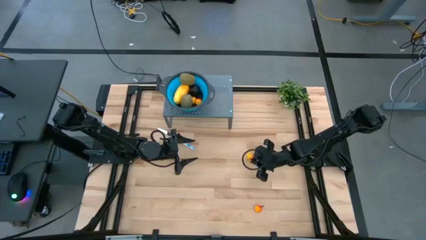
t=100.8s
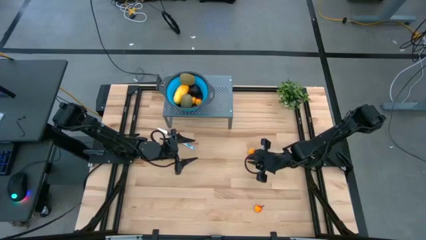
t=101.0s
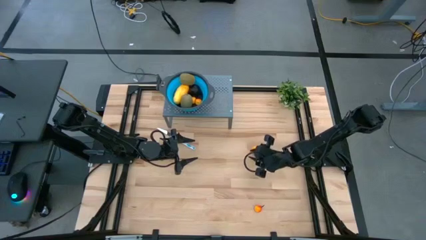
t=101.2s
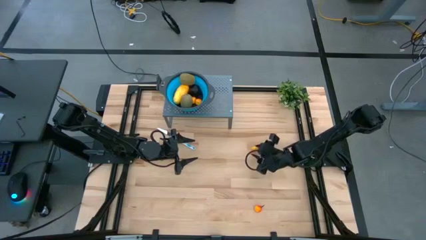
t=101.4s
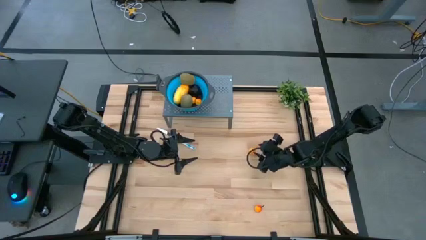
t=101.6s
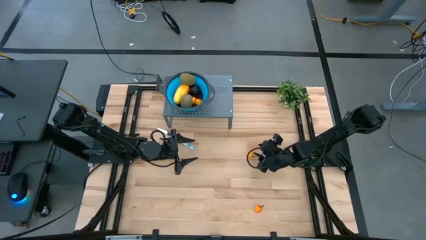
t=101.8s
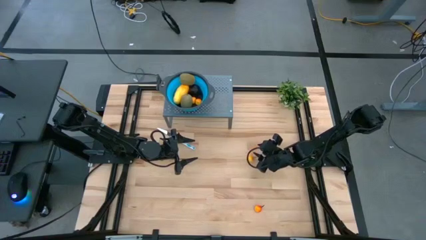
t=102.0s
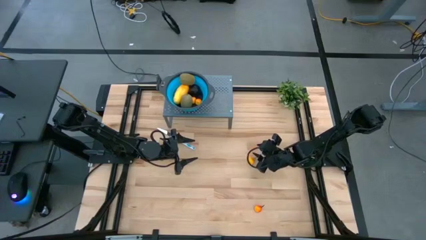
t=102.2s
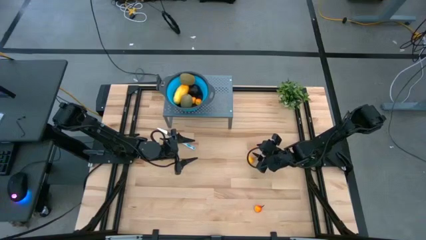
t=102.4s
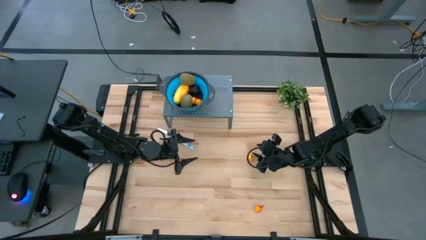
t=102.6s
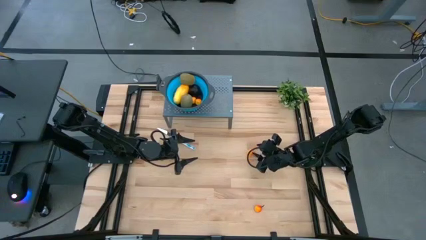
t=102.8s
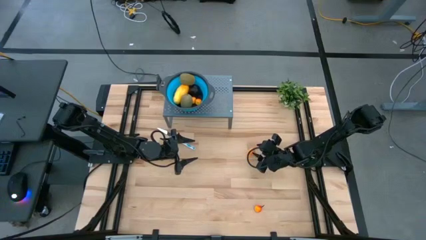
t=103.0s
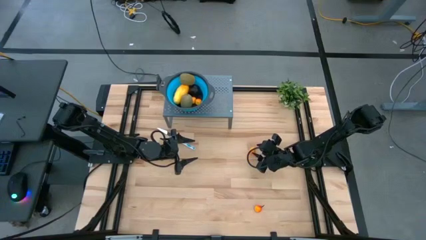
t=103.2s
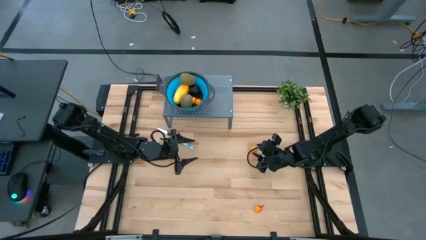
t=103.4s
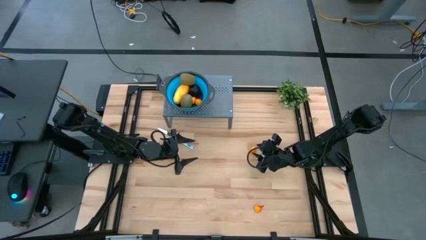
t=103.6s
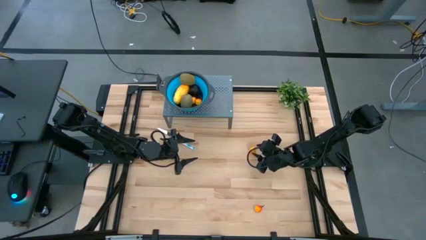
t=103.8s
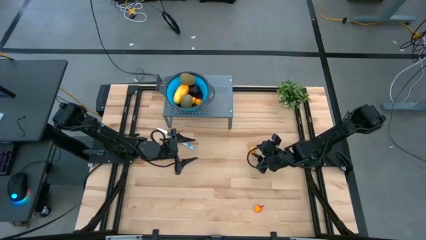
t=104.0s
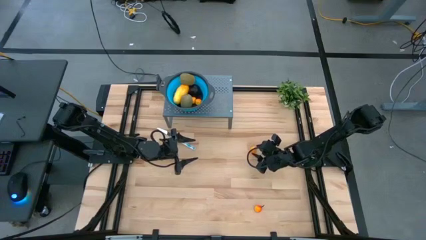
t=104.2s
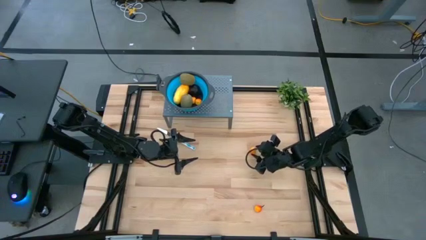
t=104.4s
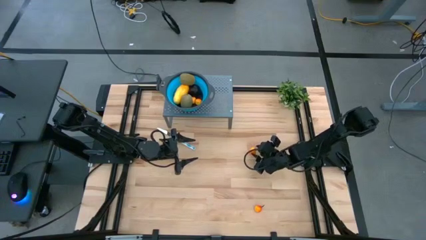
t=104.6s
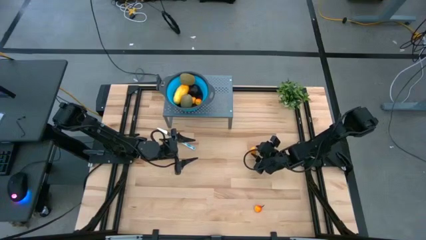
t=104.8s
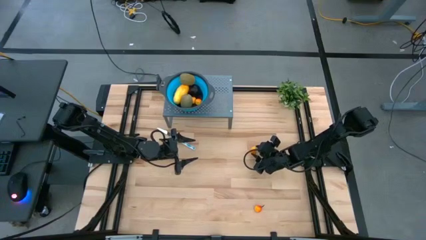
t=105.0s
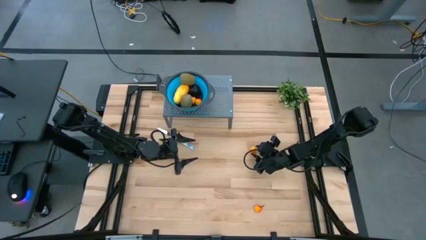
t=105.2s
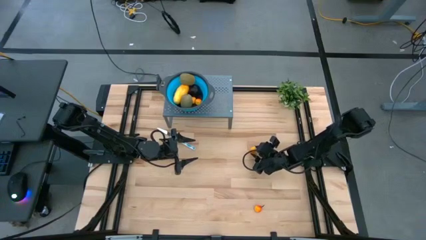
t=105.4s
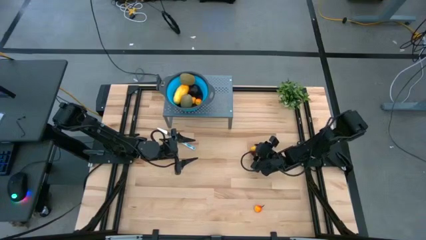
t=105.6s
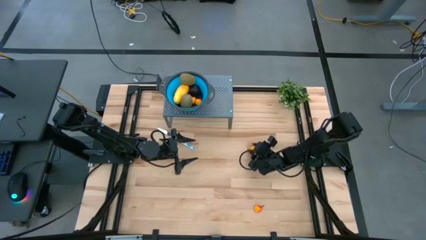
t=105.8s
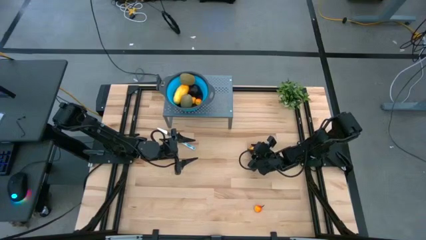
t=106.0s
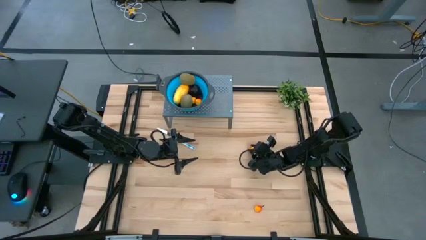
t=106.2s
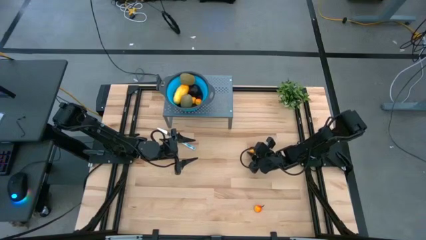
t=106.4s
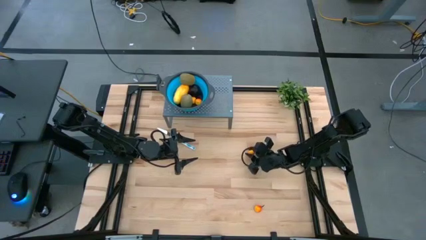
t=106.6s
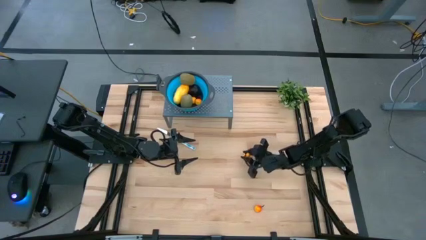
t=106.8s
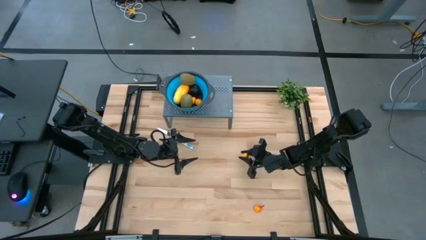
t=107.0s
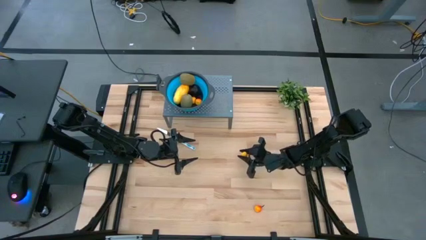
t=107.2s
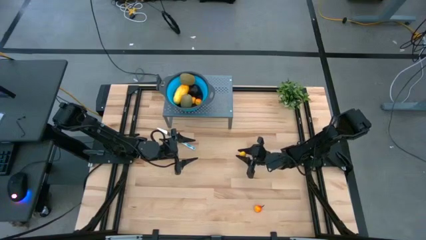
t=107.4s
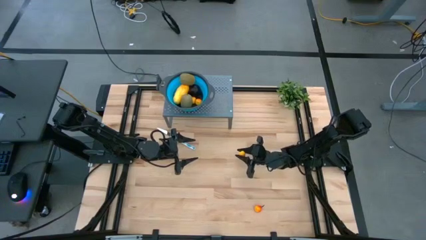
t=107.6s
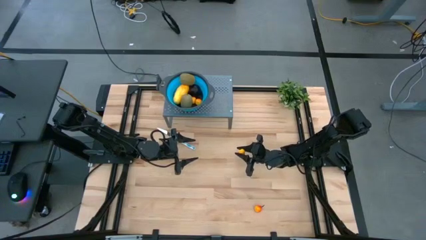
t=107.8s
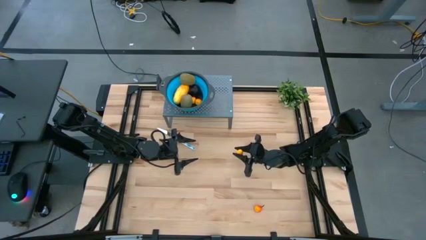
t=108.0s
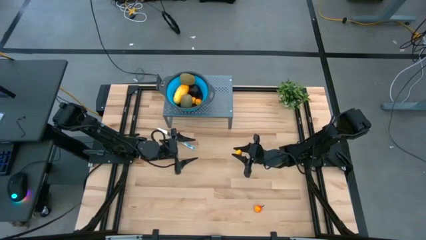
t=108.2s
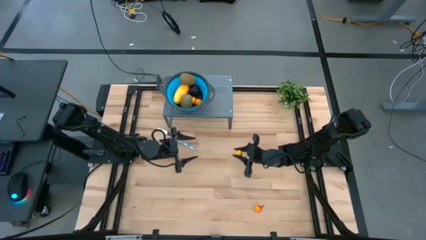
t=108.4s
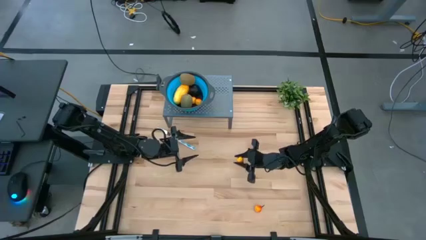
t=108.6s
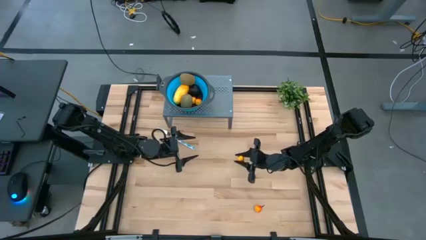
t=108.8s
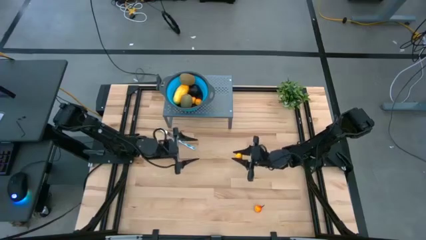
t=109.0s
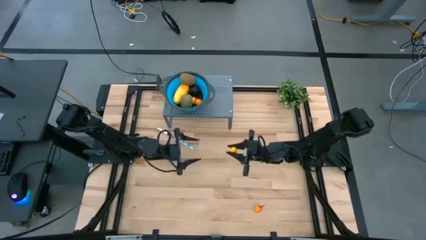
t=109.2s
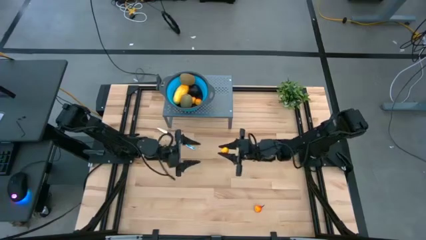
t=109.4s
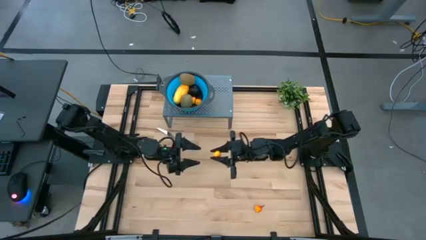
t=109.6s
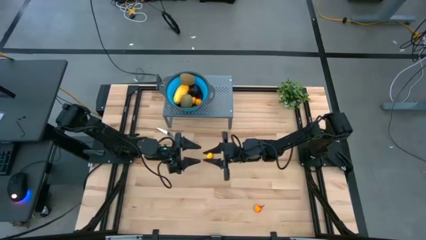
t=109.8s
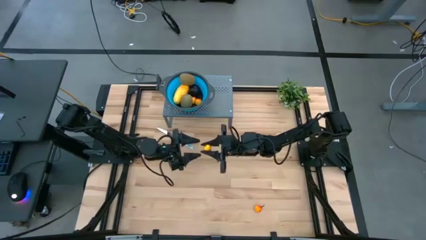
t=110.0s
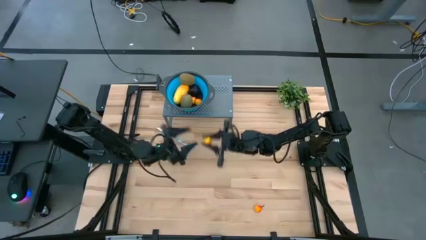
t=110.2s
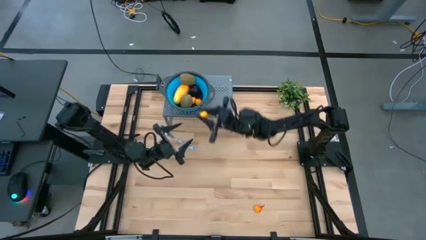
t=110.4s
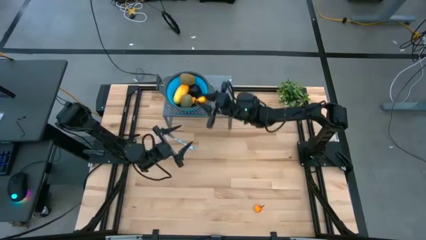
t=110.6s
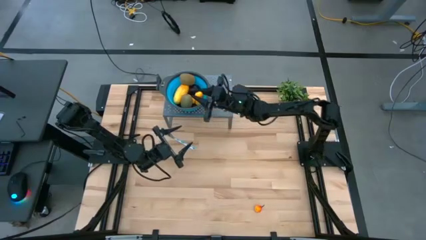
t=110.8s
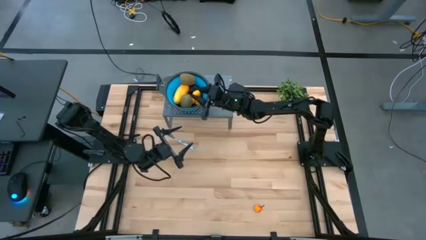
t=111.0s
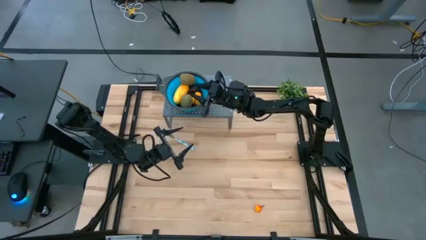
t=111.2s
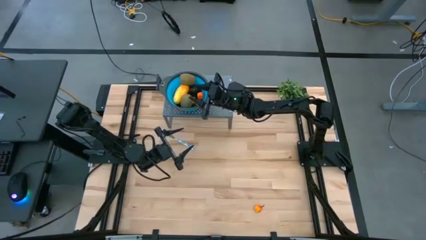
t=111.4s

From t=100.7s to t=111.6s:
Task: Pick & Place Fruit
Put the right pear into the blue strainer bowl
